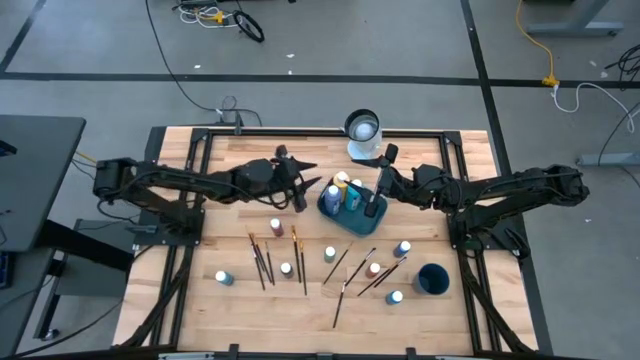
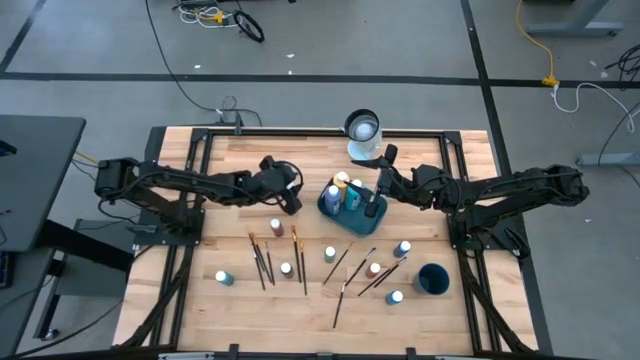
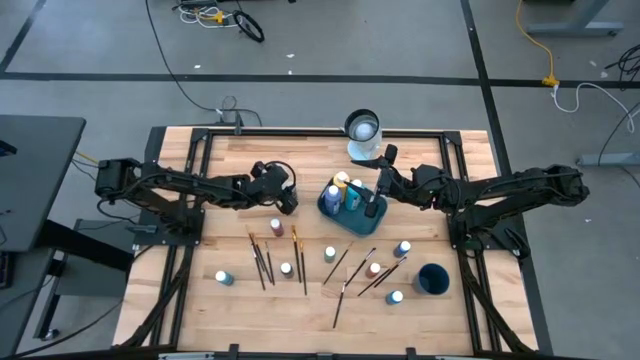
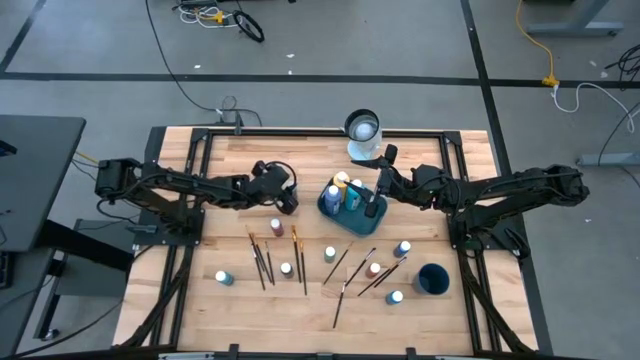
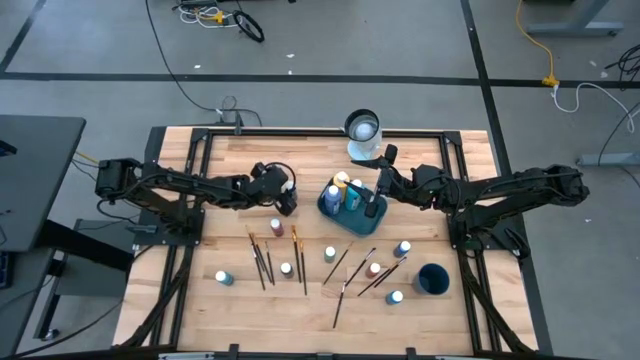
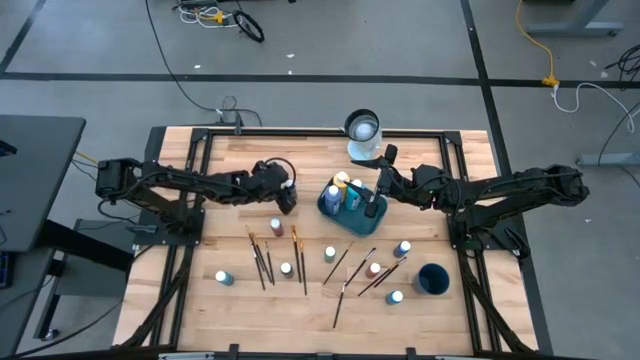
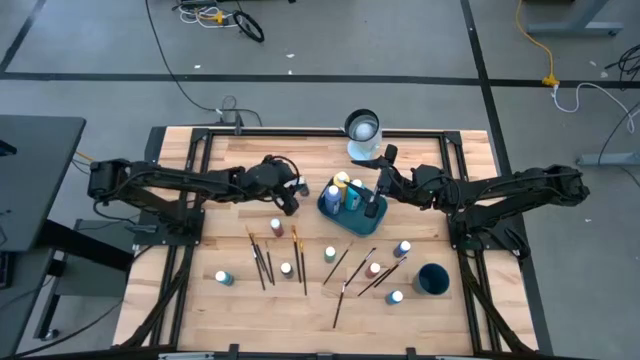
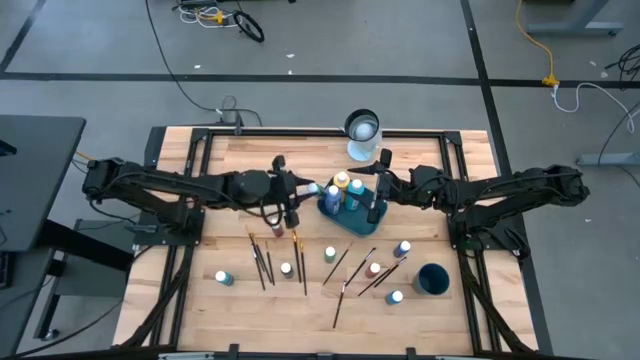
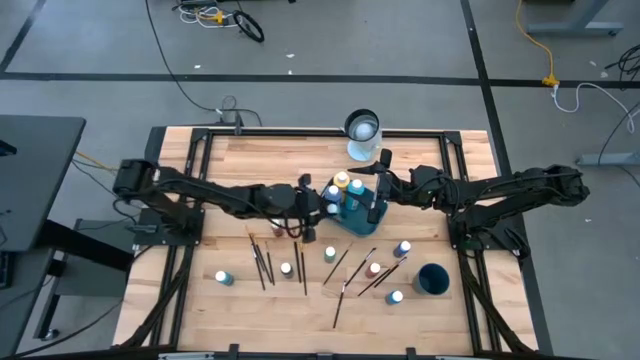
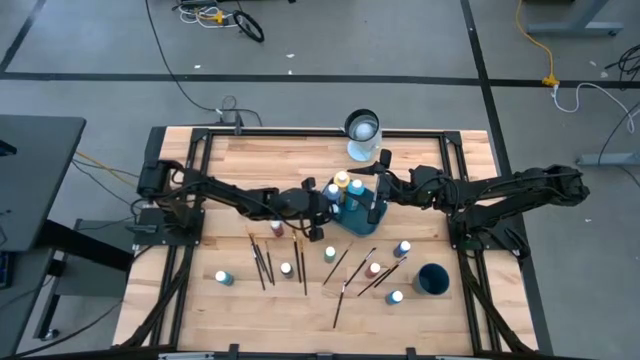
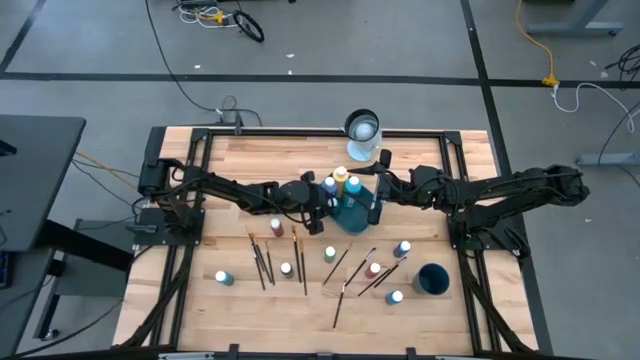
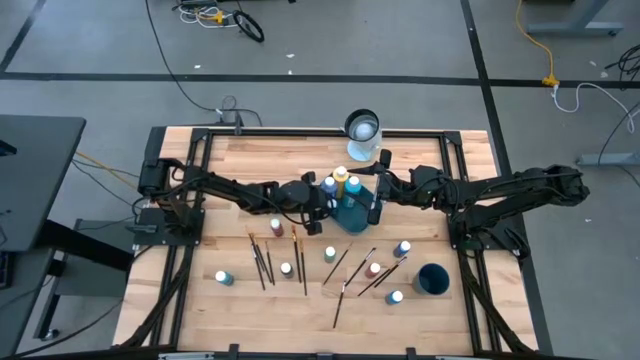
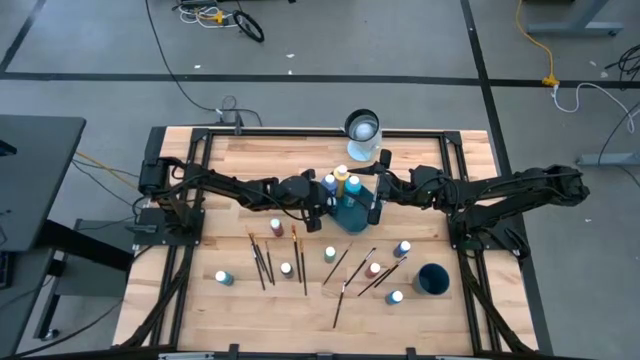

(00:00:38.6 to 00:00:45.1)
Task: Pick & Place Paint Supplies
Put the small light blue paint bottle into the green bin

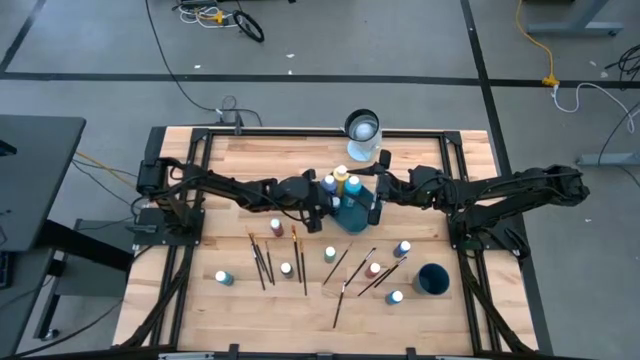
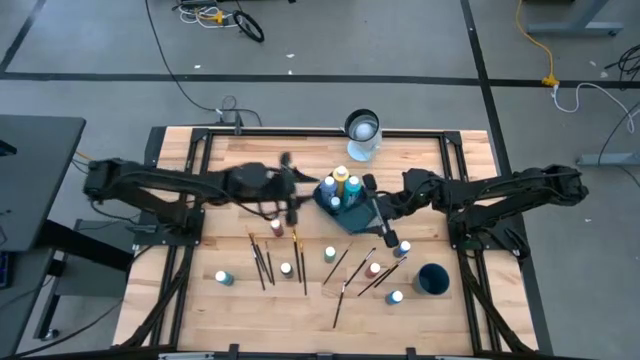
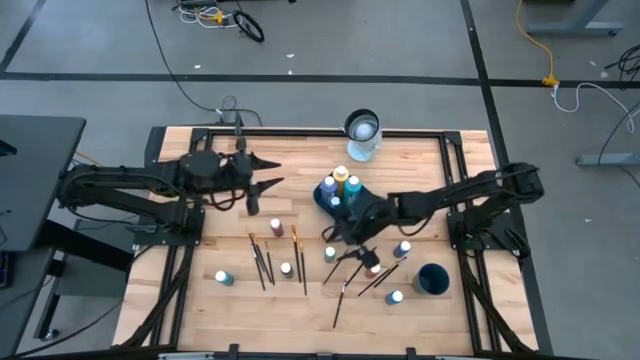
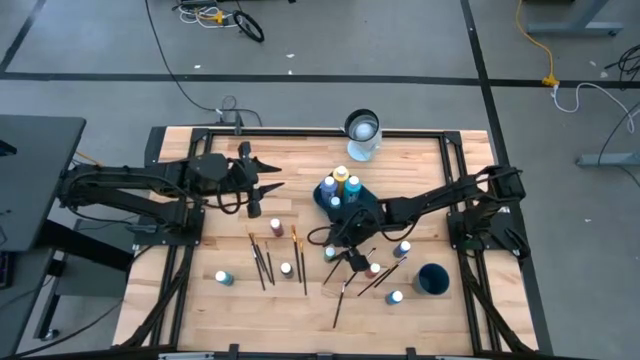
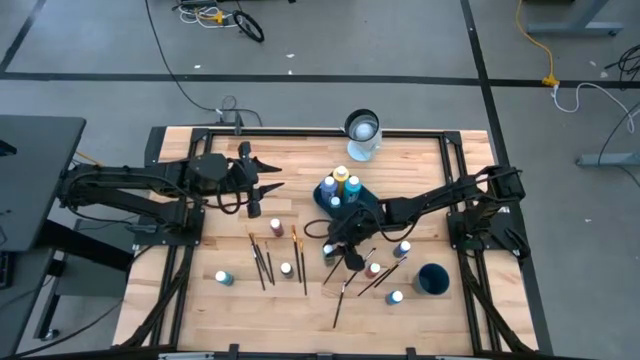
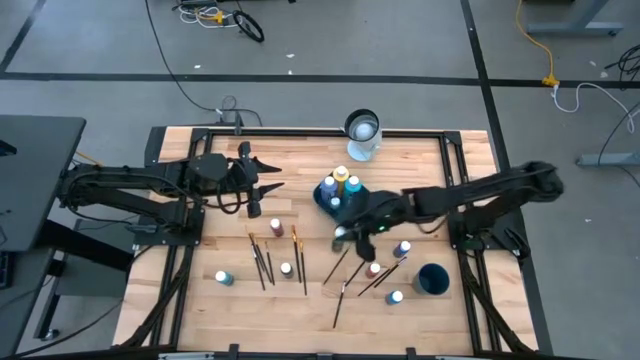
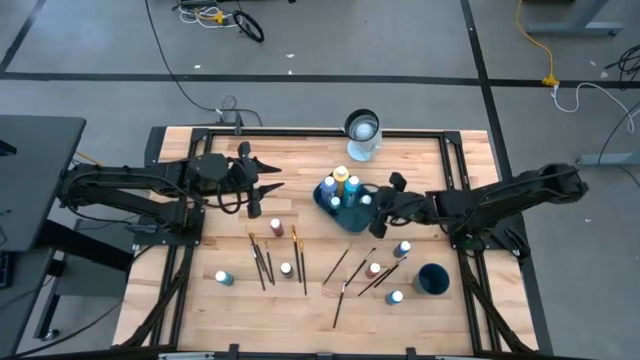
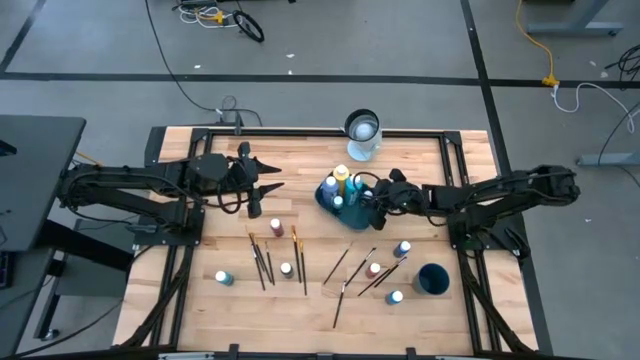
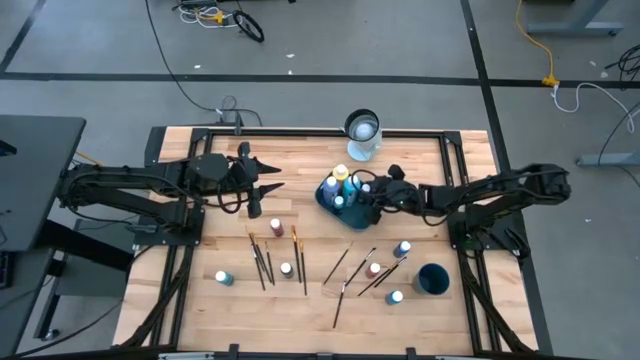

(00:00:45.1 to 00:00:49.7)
Put the green paint bottle into the green bin

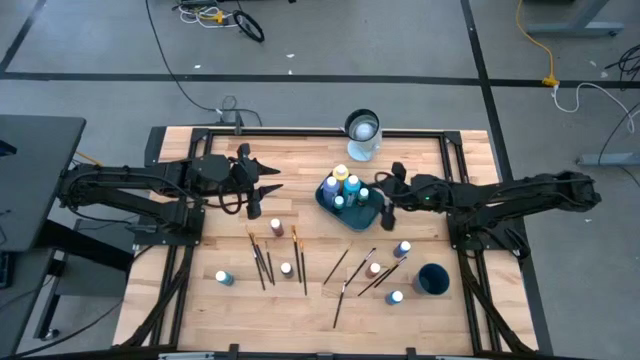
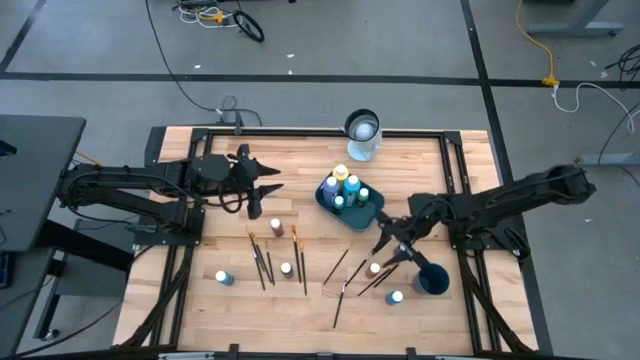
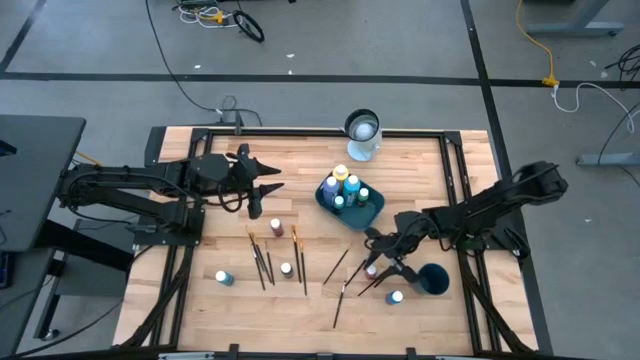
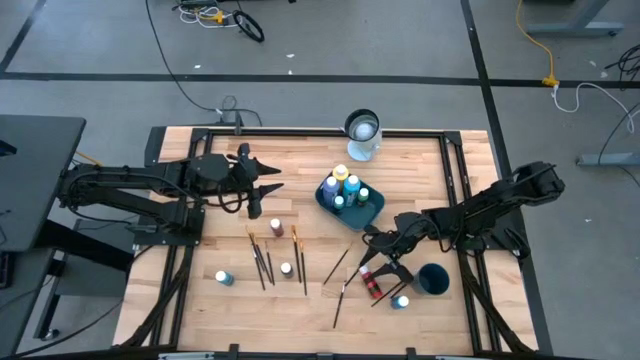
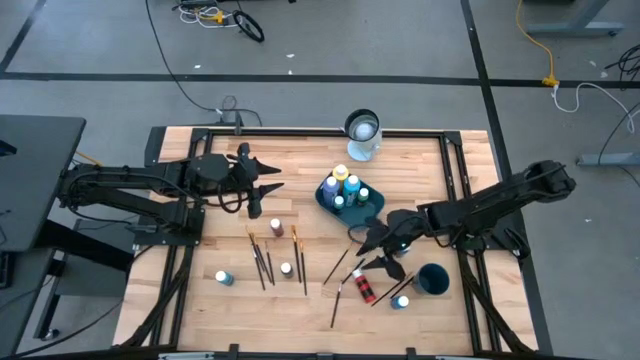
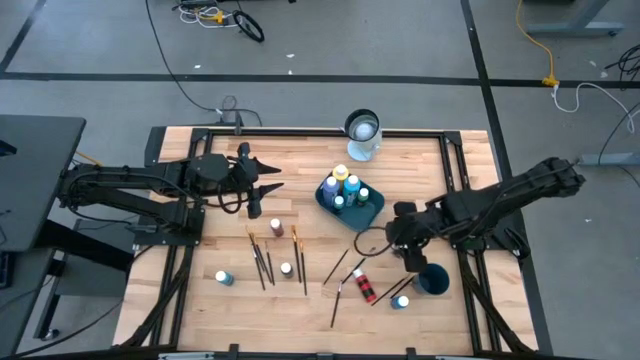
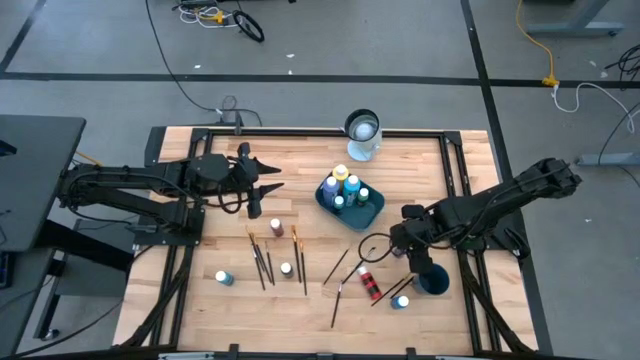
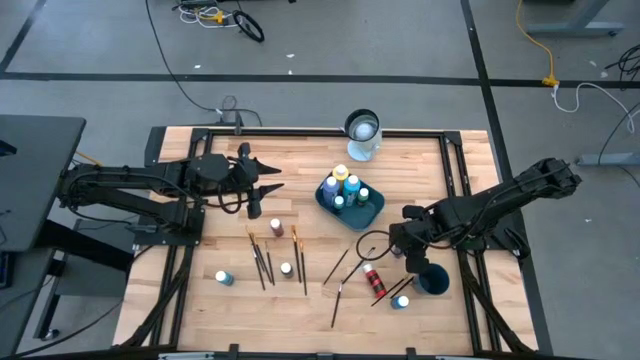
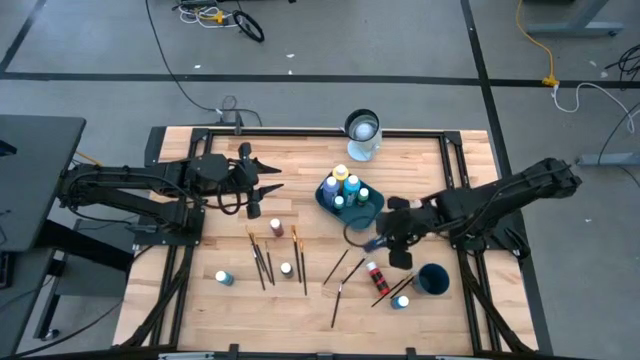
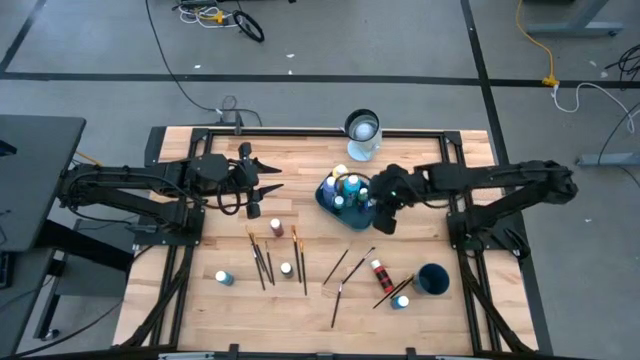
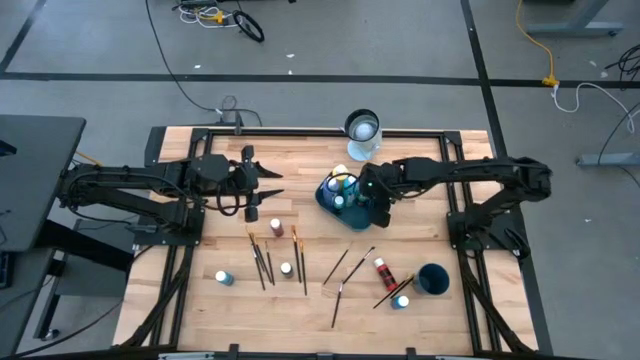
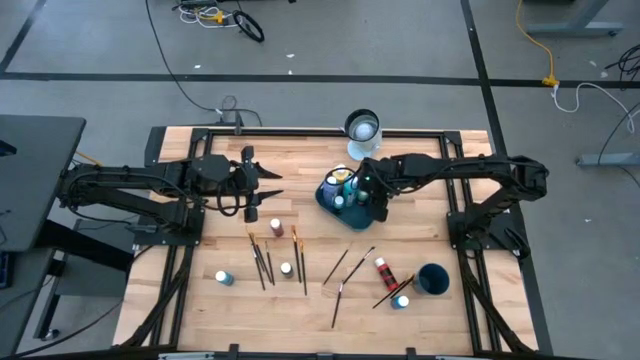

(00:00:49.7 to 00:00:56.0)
Put the blue paint bottle into the green bin

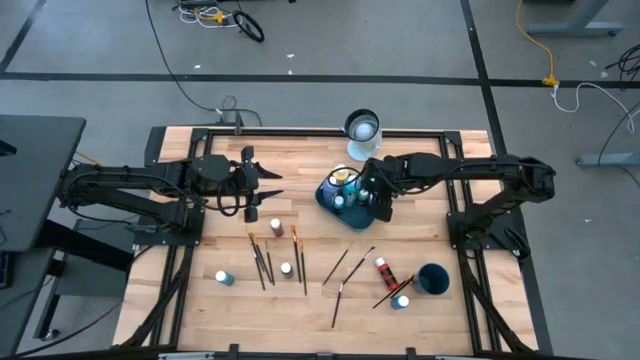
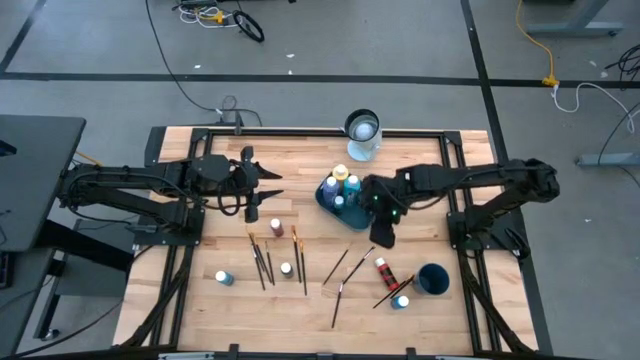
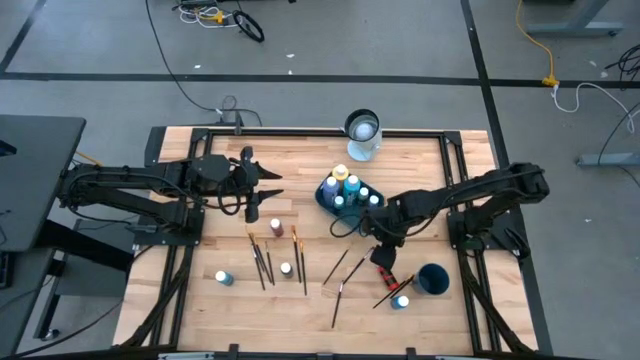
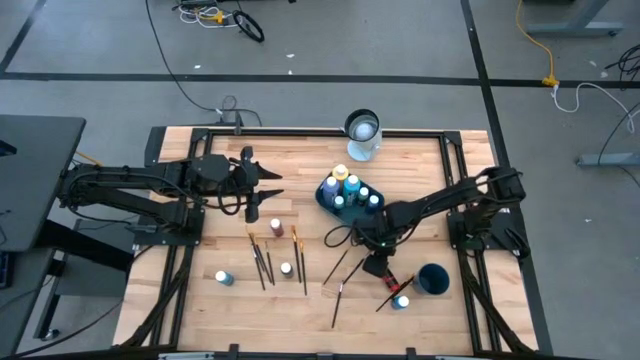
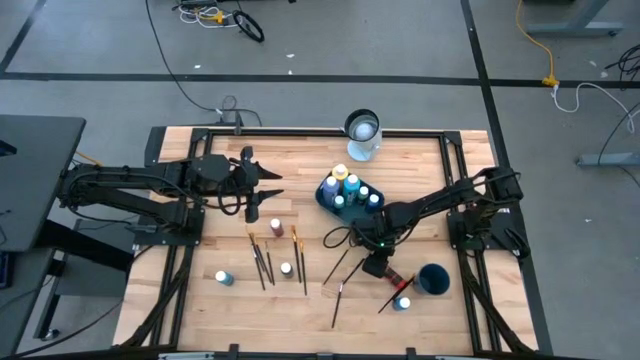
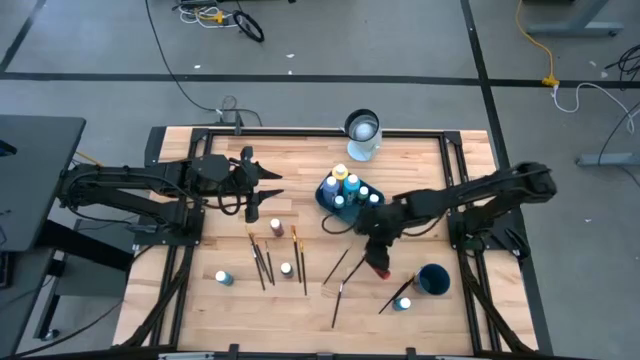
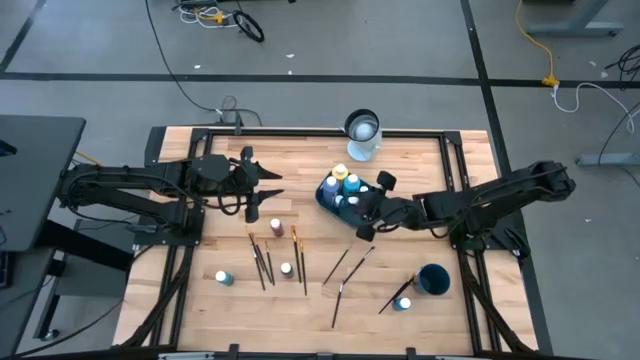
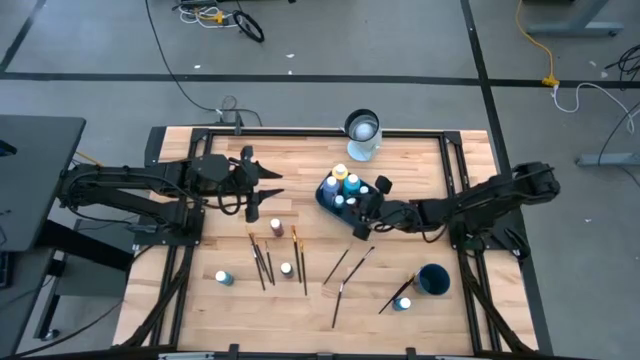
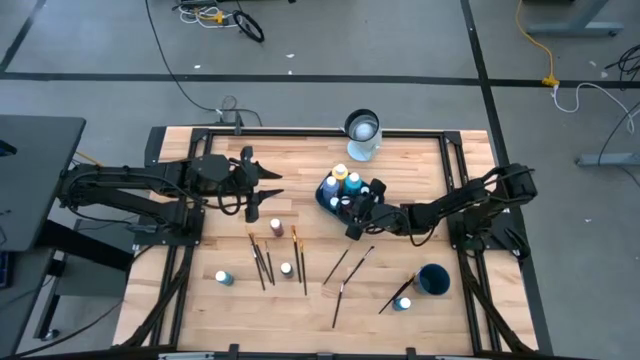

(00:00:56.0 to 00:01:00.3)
Put the red paint bottle into the green bin
